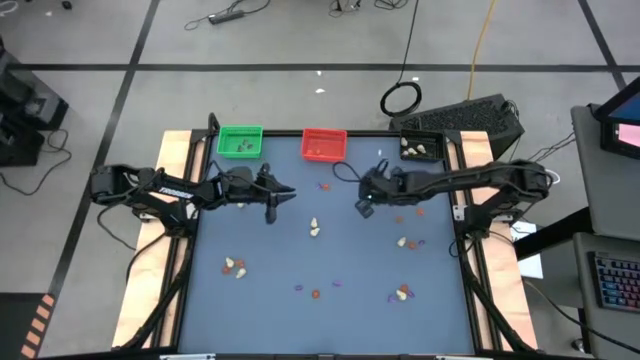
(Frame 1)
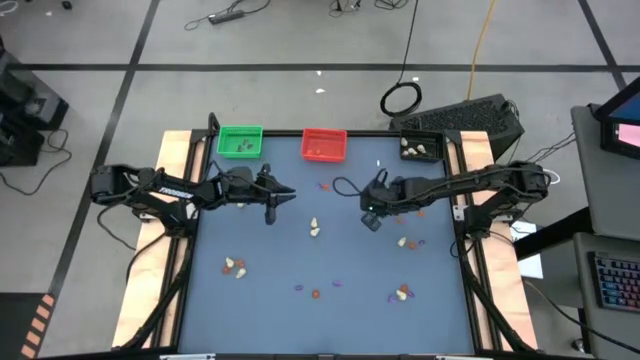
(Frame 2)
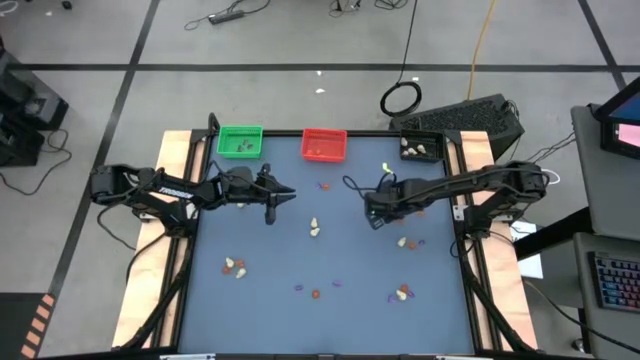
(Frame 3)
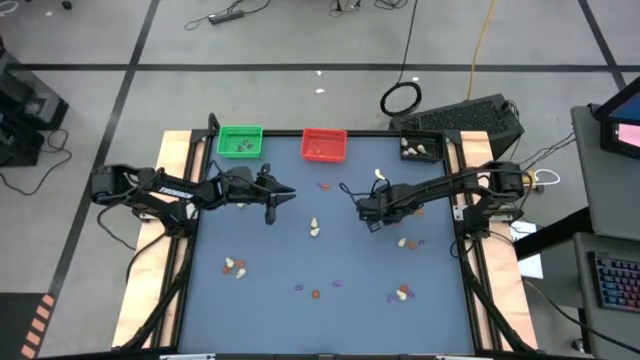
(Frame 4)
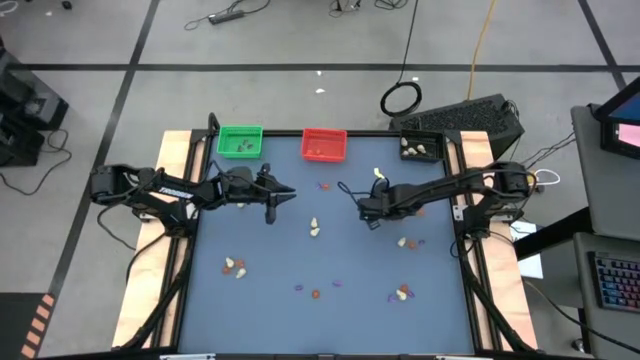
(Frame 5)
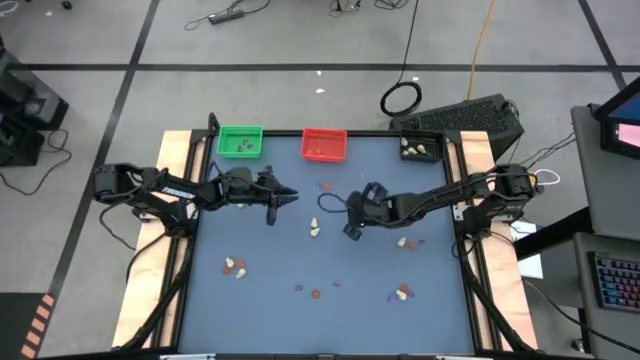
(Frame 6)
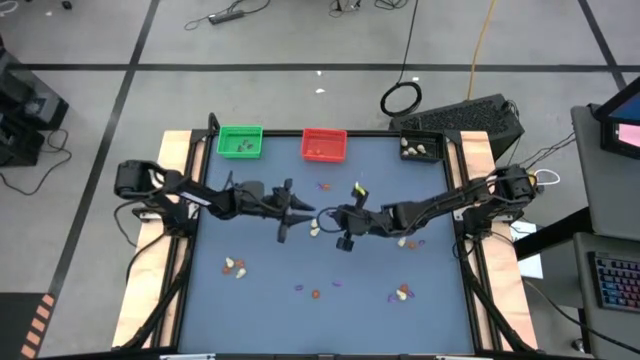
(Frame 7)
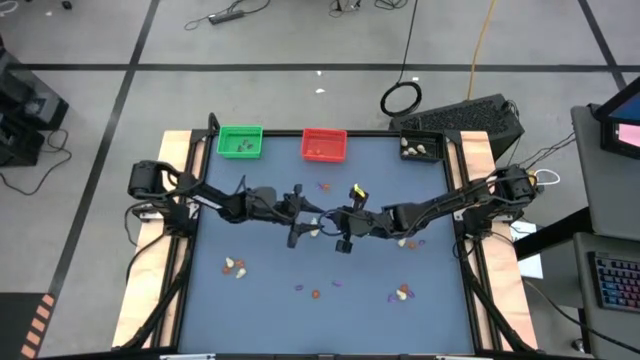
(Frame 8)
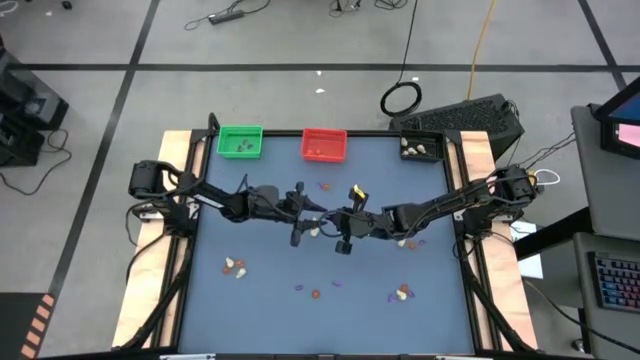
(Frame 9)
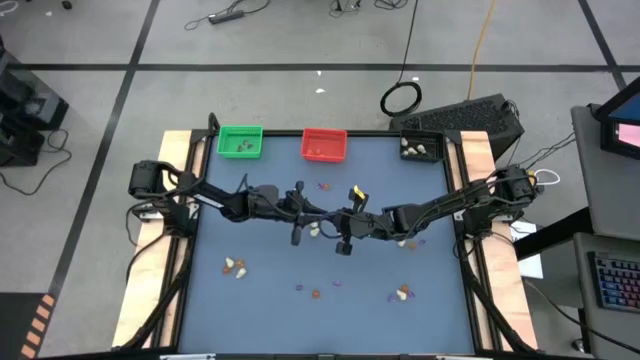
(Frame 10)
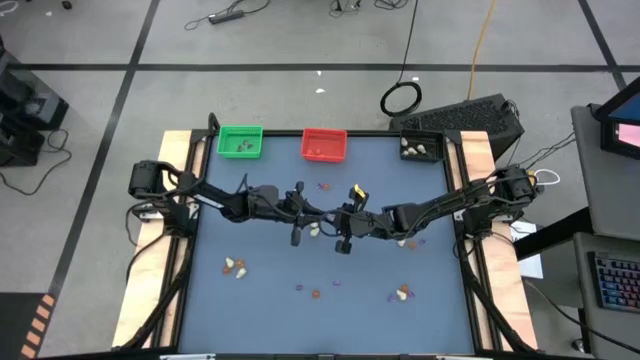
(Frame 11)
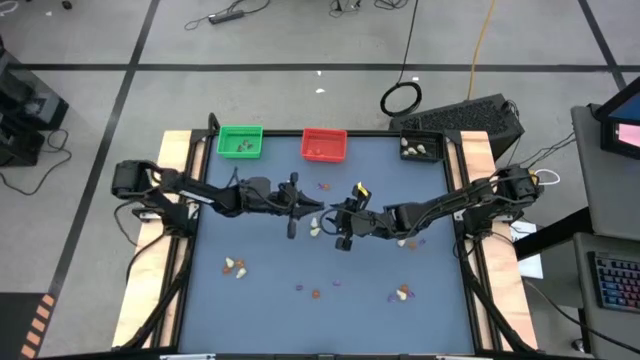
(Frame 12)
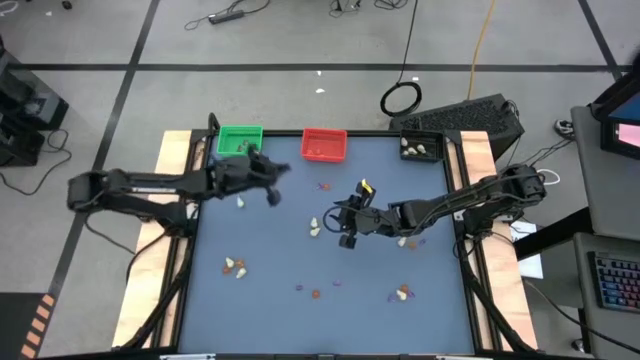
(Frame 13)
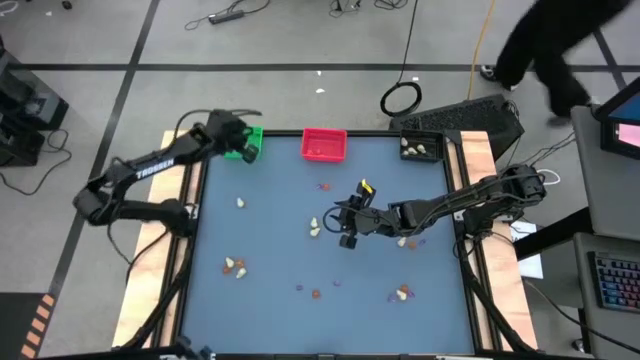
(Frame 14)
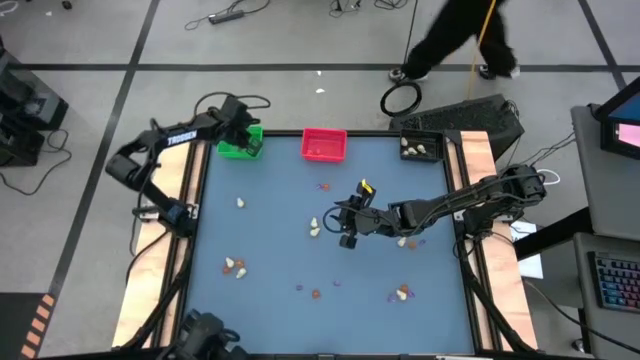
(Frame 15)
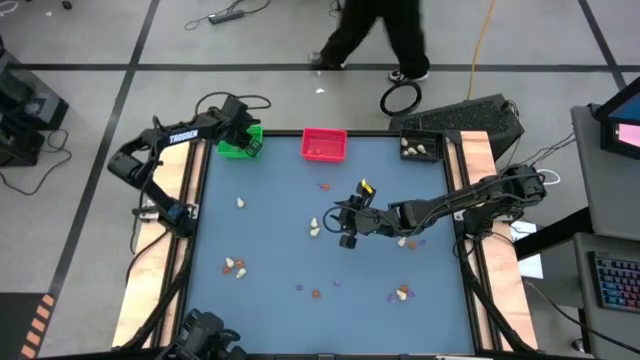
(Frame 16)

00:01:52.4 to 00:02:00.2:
Task: Sort Halloween decoration
Put the purple witch hat toy into the green bin

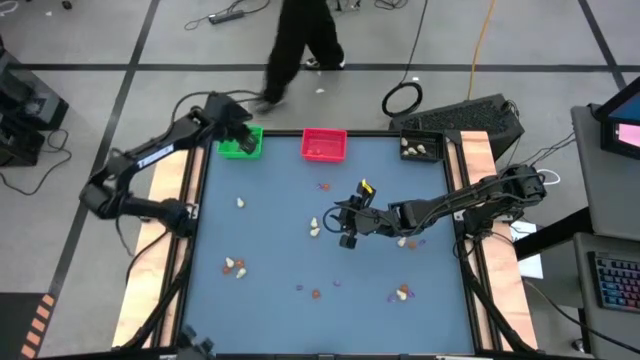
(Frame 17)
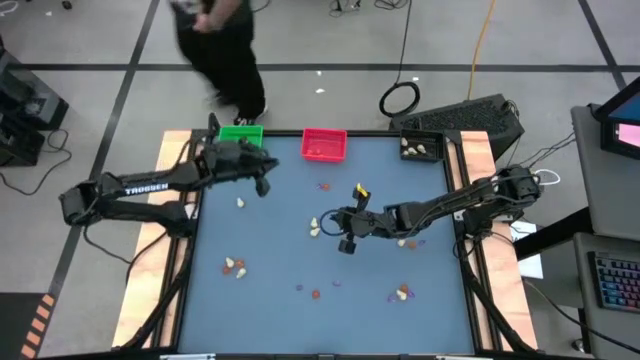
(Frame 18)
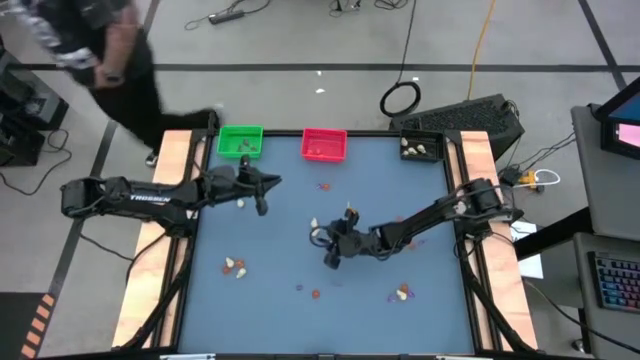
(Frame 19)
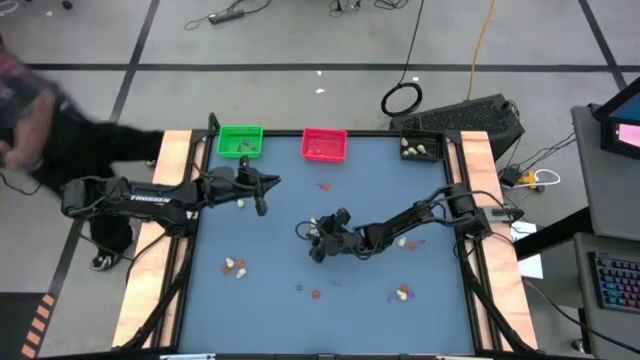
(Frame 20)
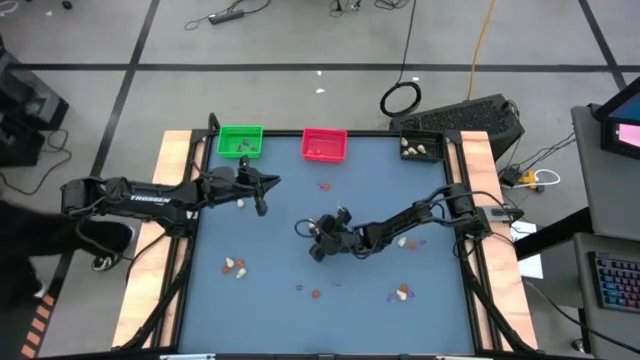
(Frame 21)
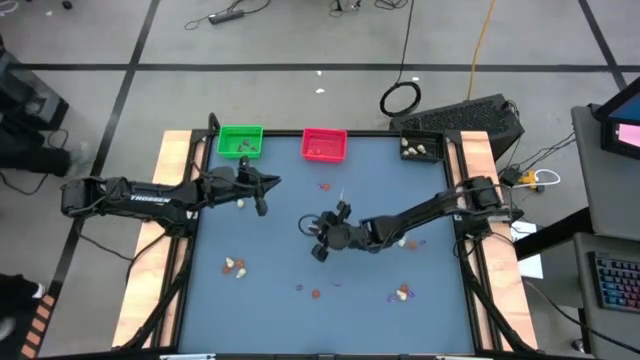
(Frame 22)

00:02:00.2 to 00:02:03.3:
Put the white skull toy into the black bin

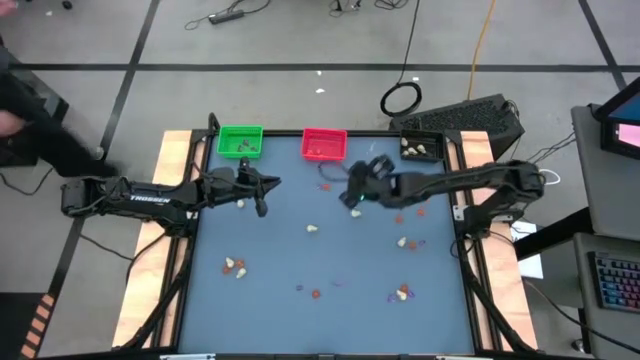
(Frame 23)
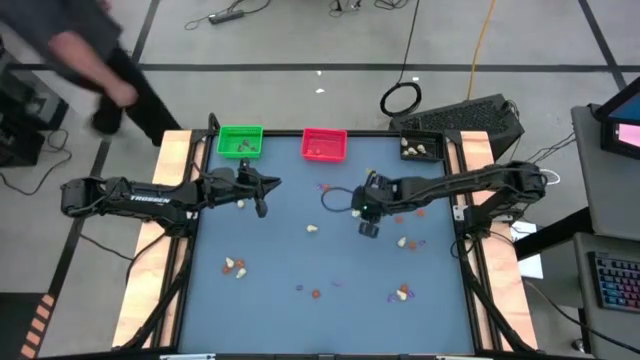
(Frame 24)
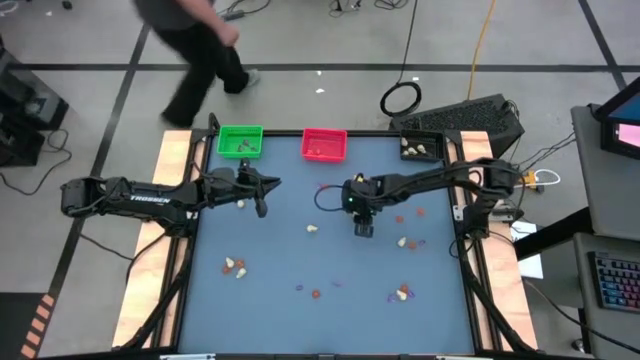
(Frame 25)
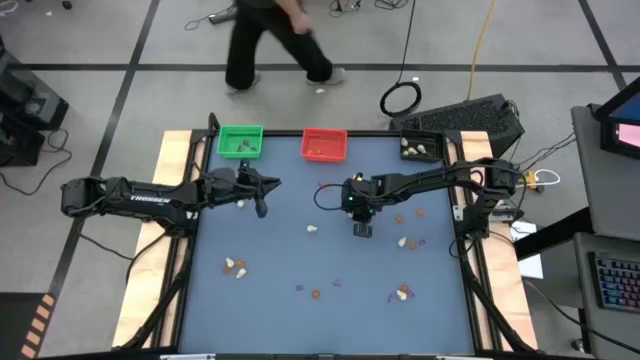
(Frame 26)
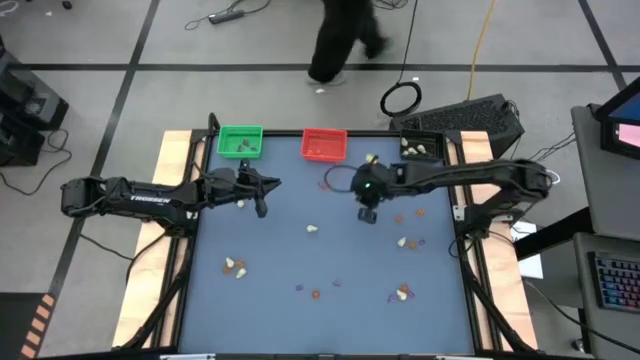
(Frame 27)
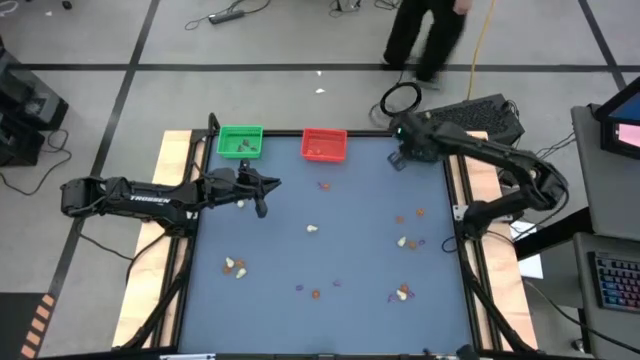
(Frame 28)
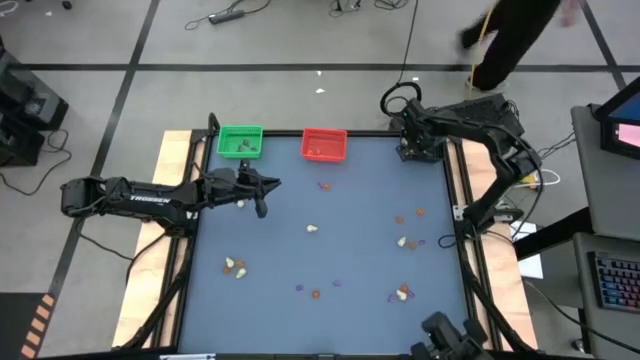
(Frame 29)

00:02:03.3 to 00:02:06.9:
Put the white skull toy into the black bin

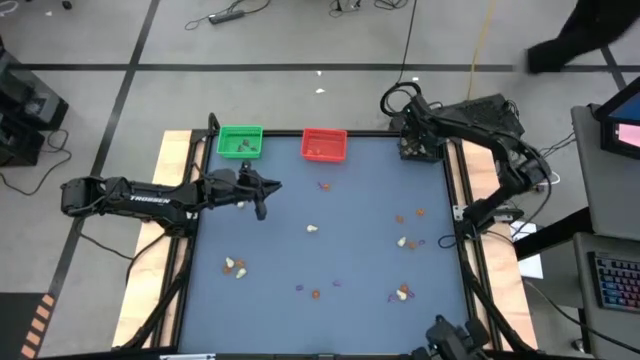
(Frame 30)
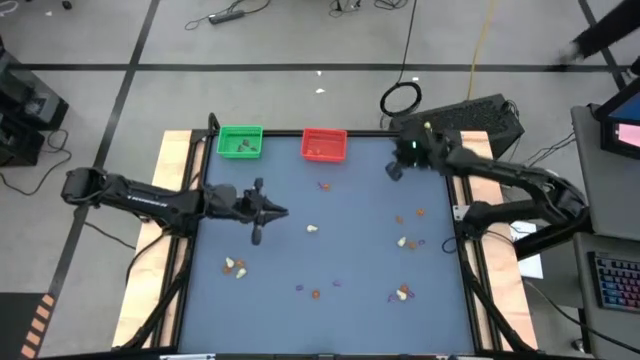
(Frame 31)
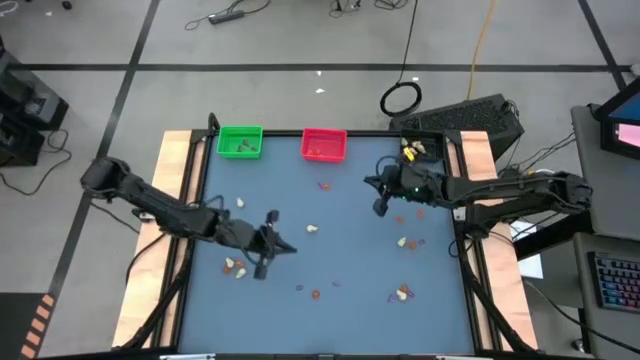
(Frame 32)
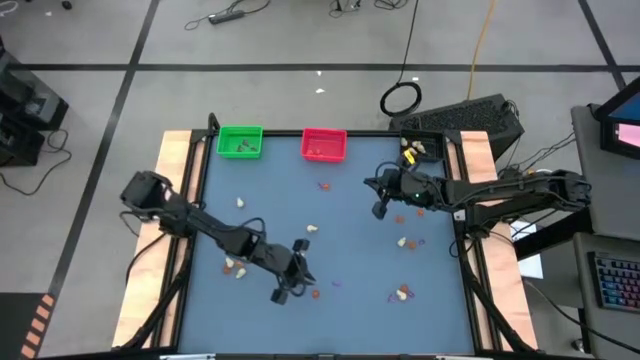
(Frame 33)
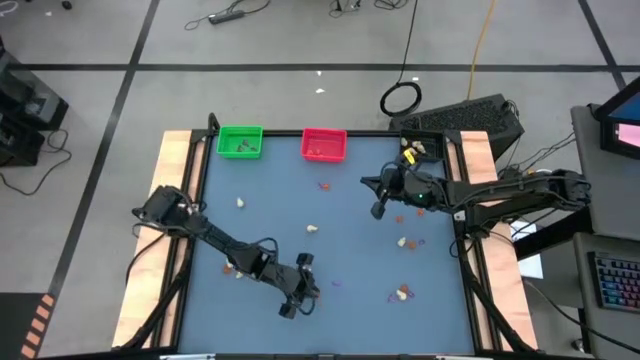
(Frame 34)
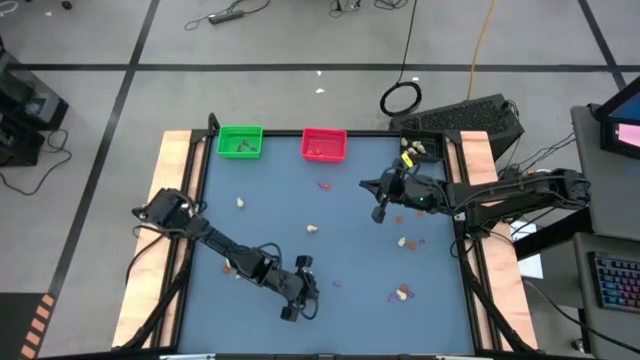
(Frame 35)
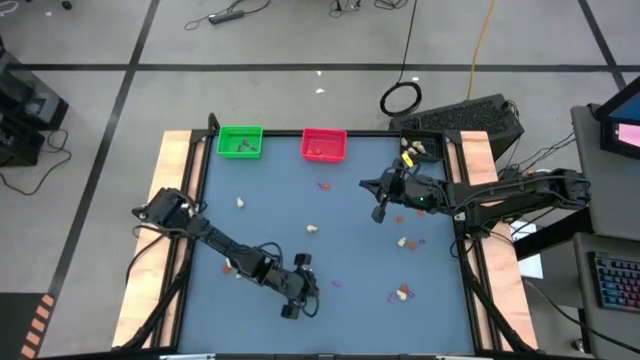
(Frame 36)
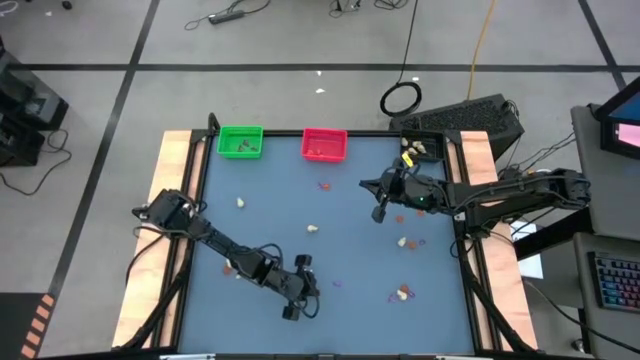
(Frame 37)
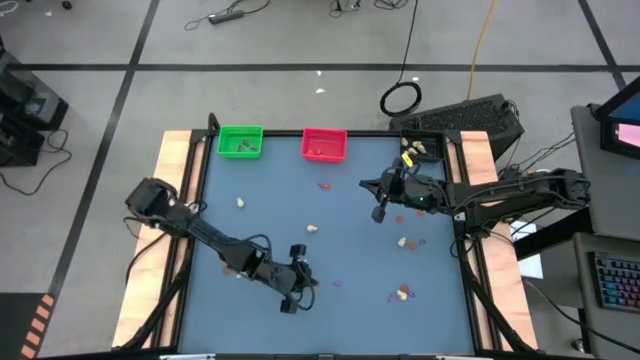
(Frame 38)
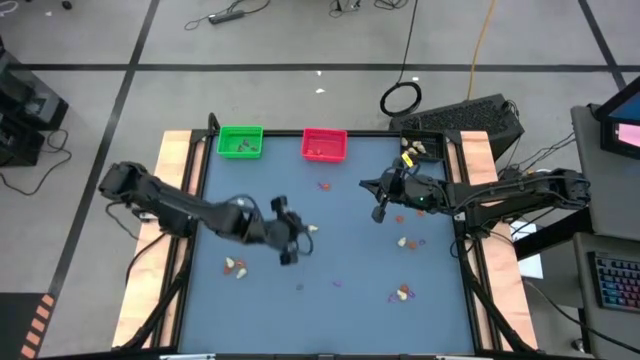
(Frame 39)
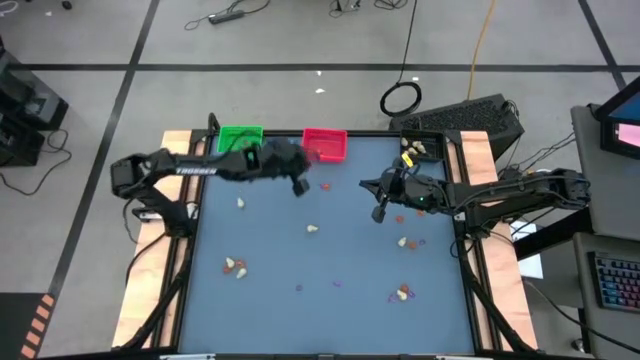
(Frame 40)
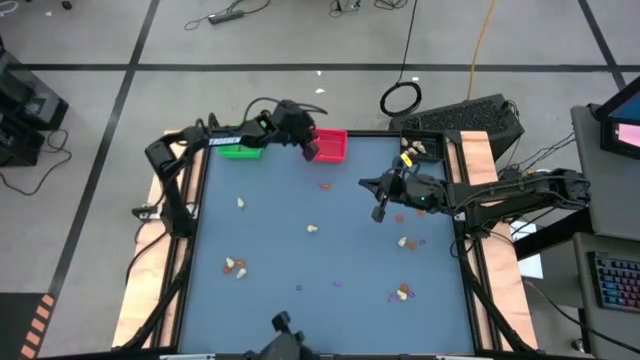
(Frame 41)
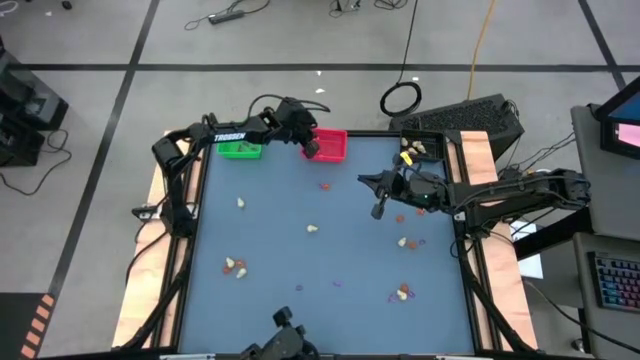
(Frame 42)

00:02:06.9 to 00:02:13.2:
Put the orange pumpkin toy into the red bin
